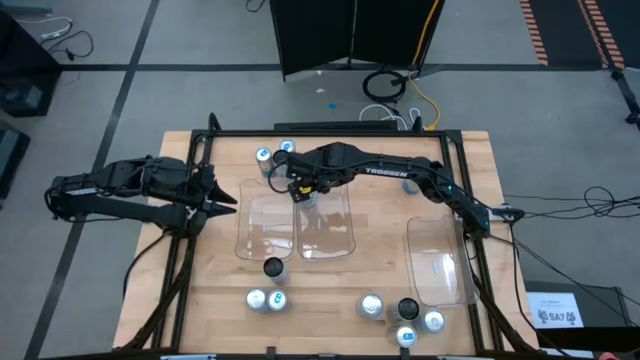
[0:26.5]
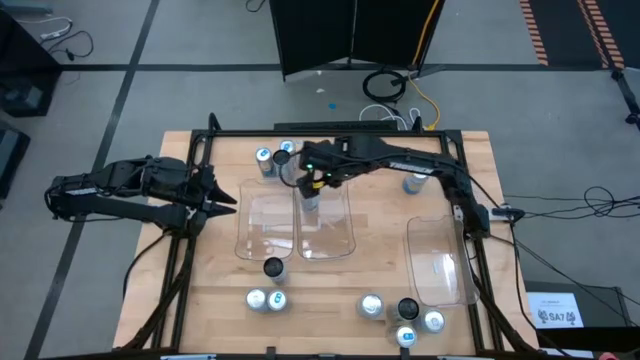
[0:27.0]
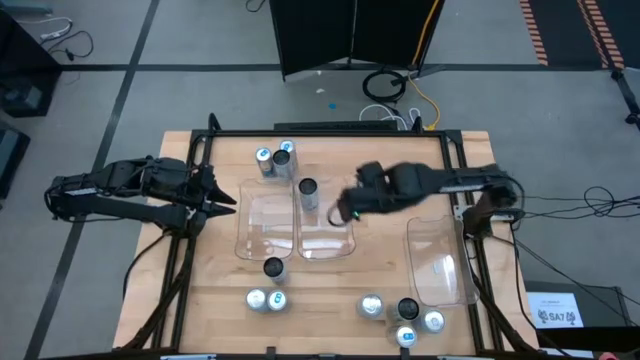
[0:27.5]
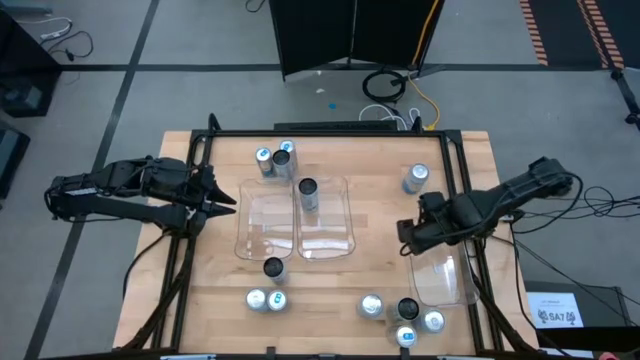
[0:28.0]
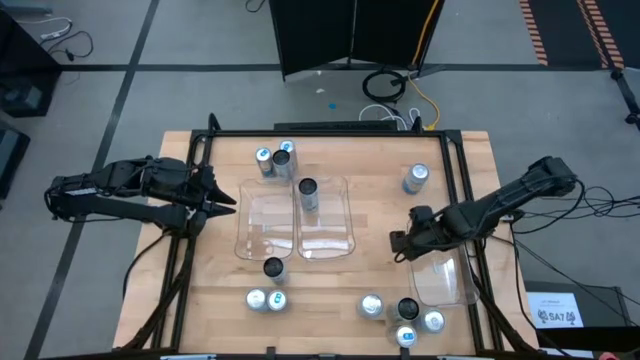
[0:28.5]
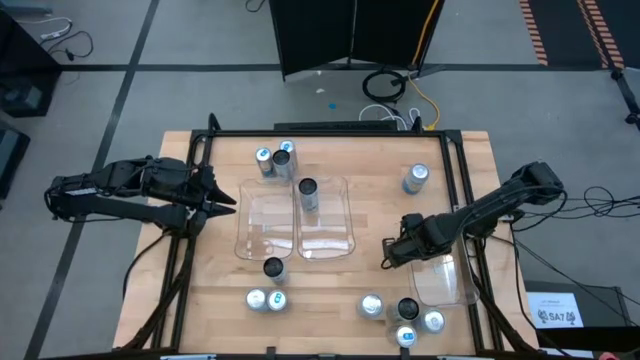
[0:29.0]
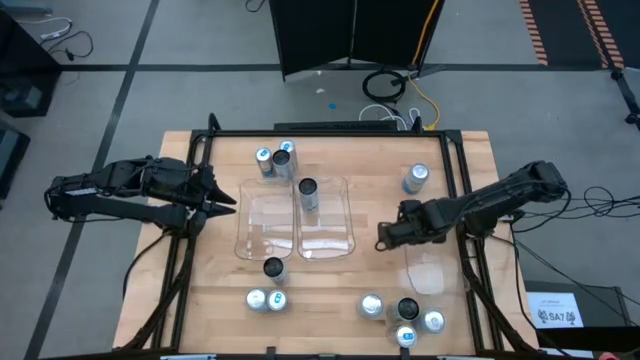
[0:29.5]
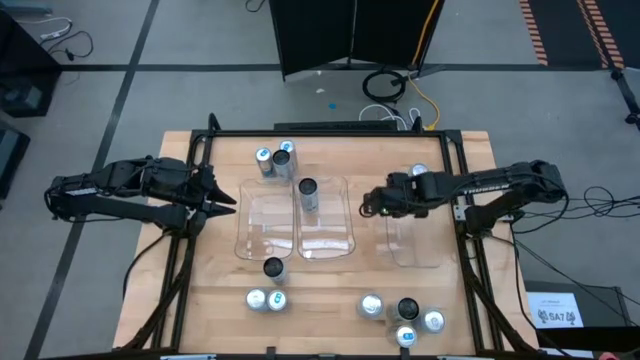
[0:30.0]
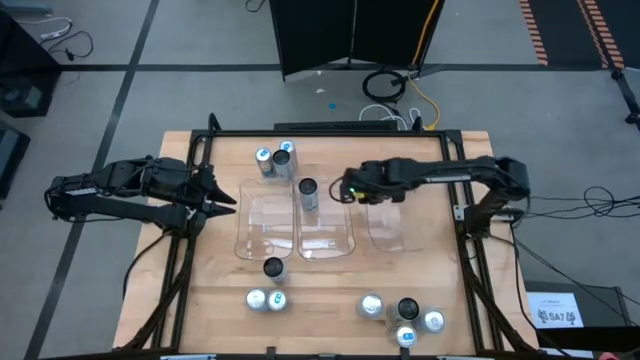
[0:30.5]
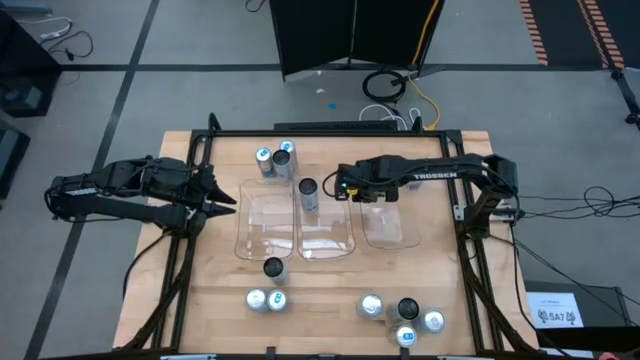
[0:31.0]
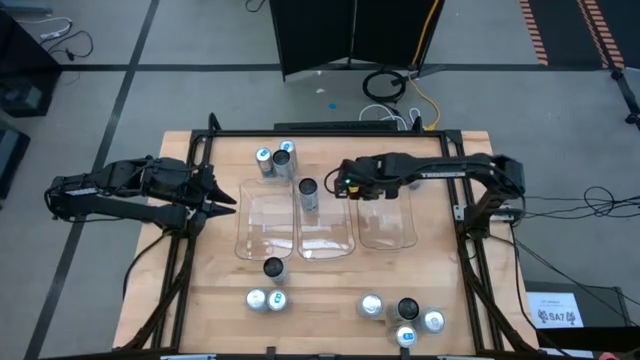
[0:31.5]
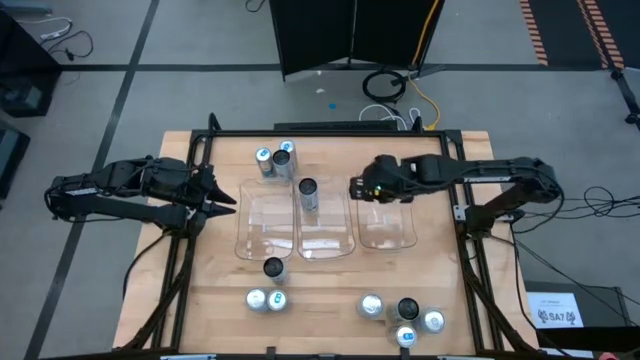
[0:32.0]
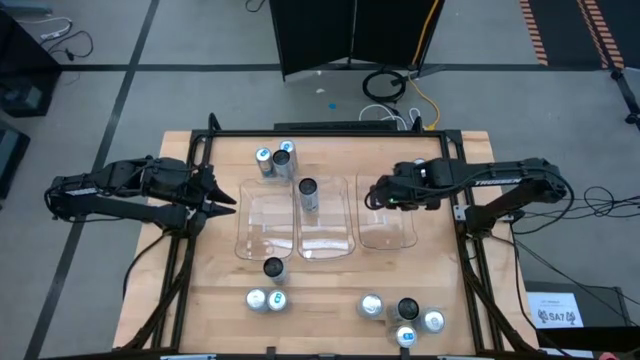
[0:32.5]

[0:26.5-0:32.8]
Task: Sort soda cans
Move the bottom transparent bin to the middle right of the table

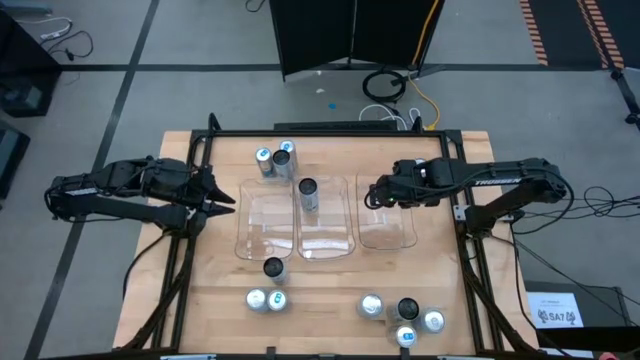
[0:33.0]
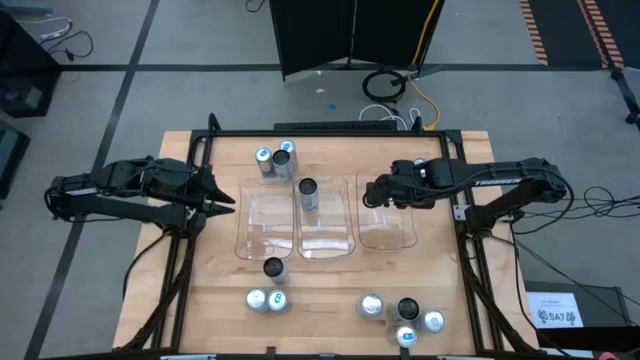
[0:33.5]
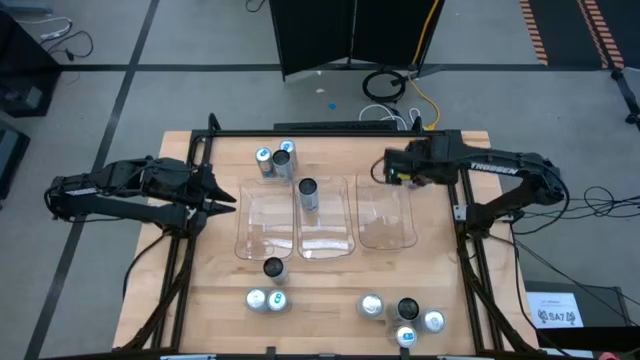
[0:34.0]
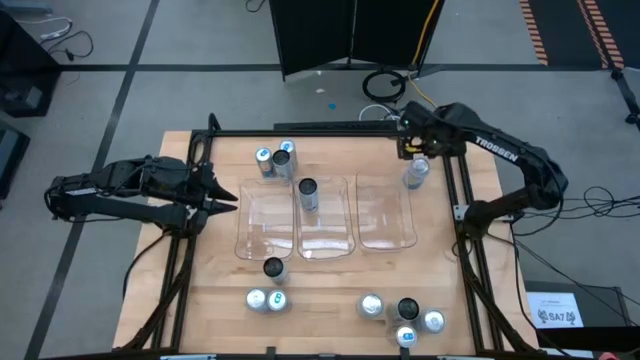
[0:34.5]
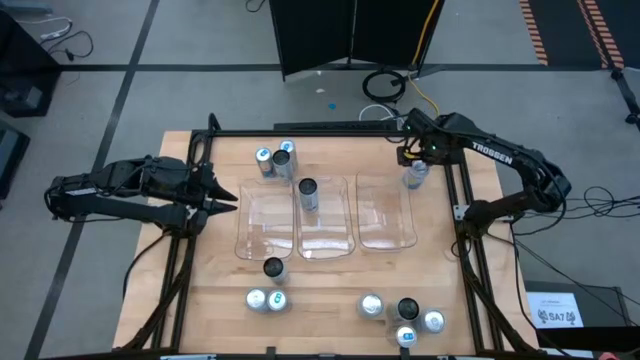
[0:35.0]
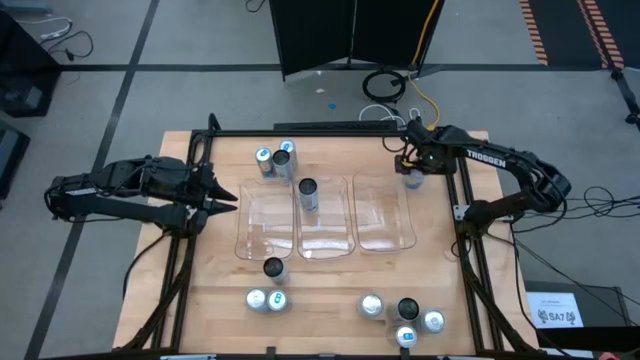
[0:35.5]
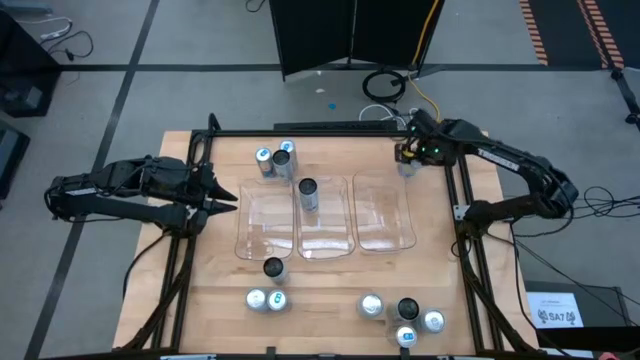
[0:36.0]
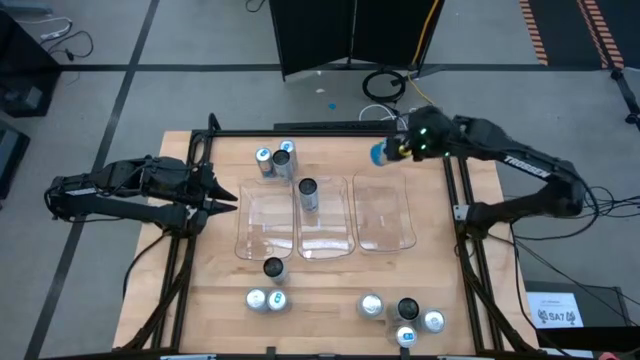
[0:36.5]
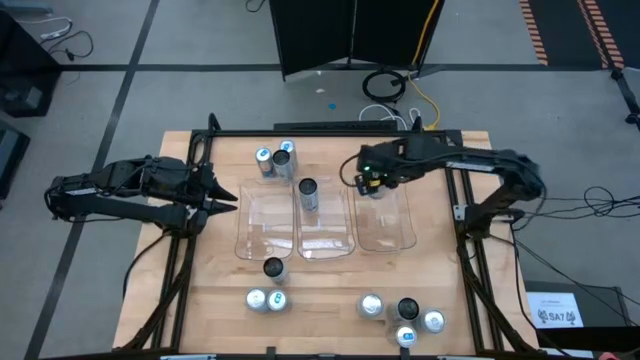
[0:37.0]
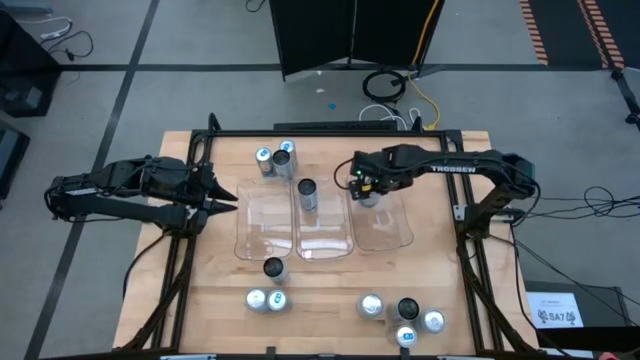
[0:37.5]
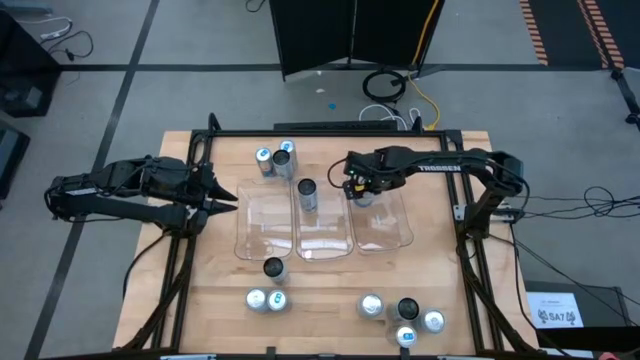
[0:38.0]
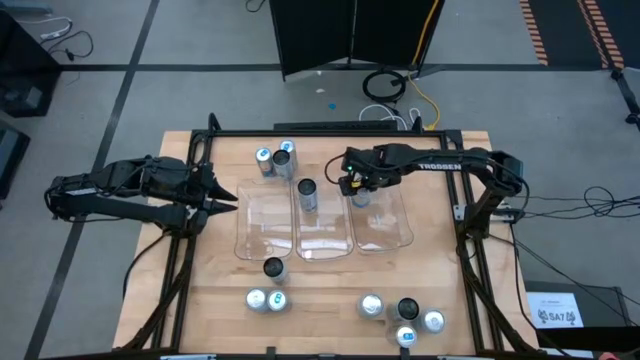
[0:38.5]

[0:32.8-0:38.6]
Put the top blue-white soda can into the right transparent bin

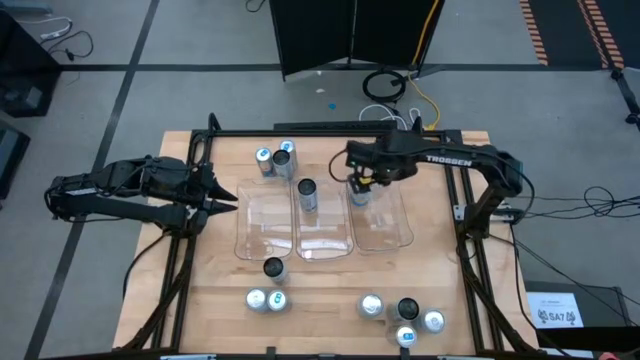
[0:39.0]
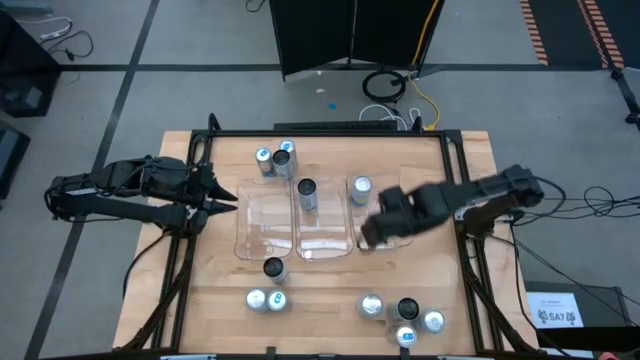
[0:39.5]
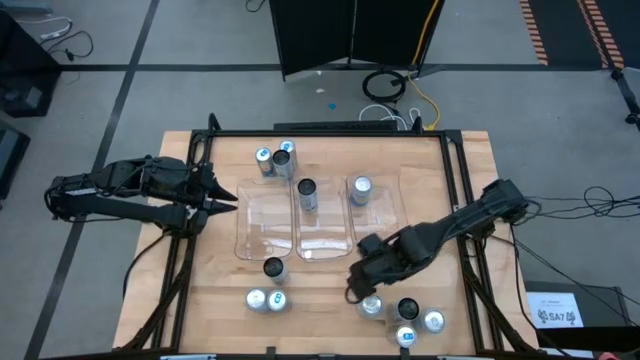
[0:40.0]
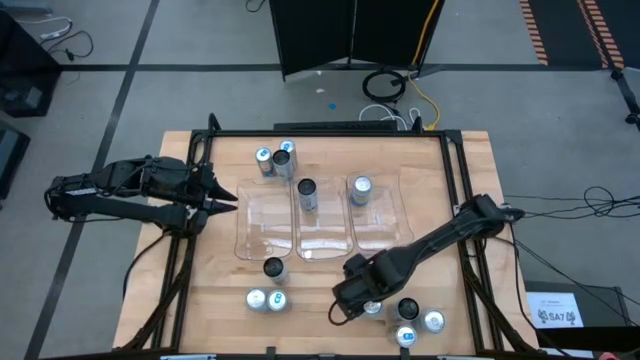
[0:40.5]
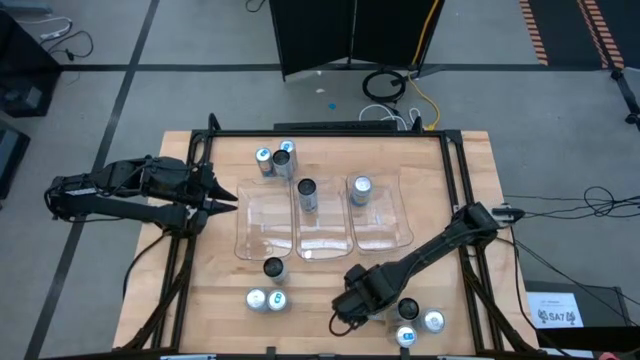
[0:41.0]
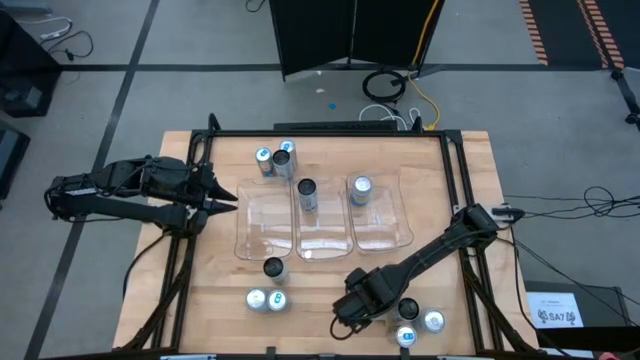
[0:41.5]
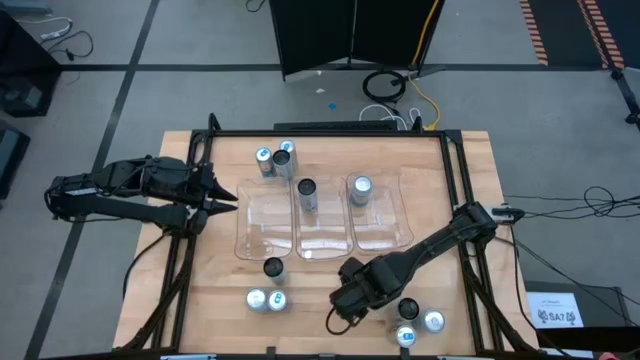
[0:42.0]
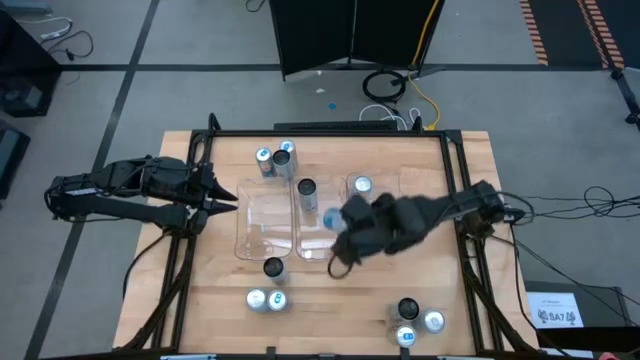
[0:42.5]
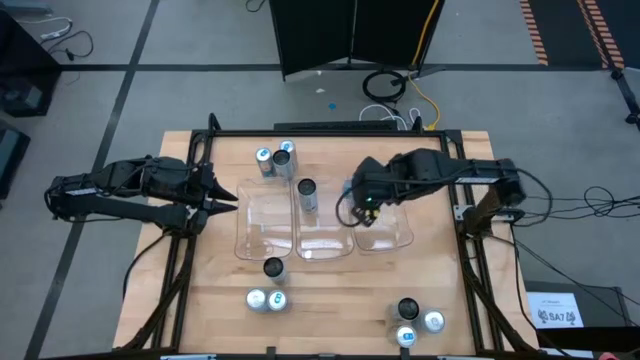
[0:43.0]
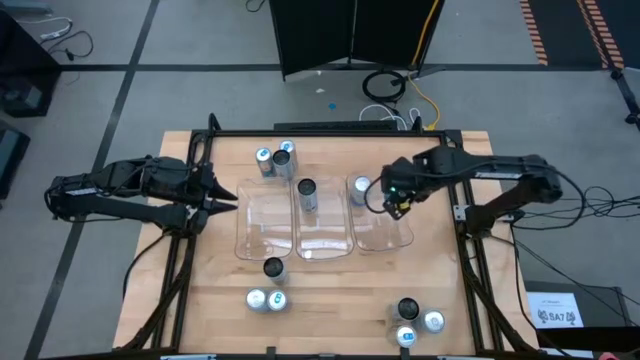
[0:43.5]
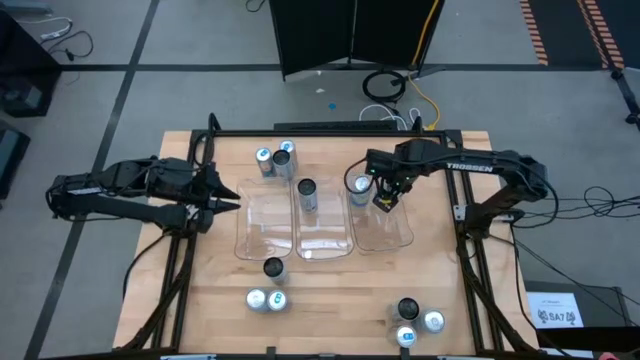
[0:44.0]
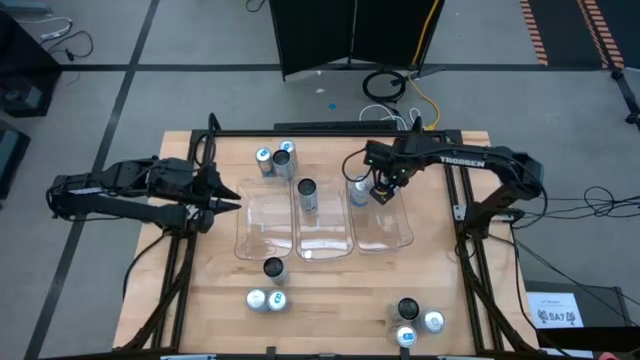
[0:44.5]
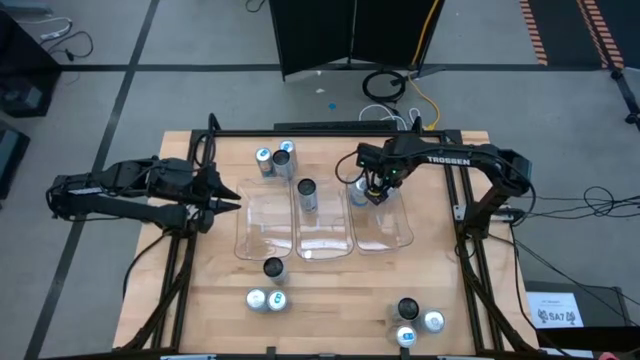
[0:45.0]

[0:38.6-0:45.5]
Put the bottom center blue-white soda can into the right transparent bin

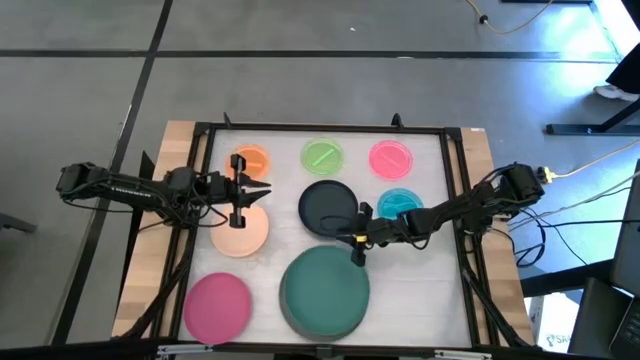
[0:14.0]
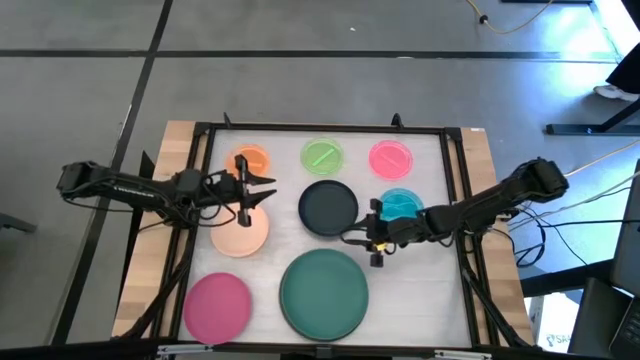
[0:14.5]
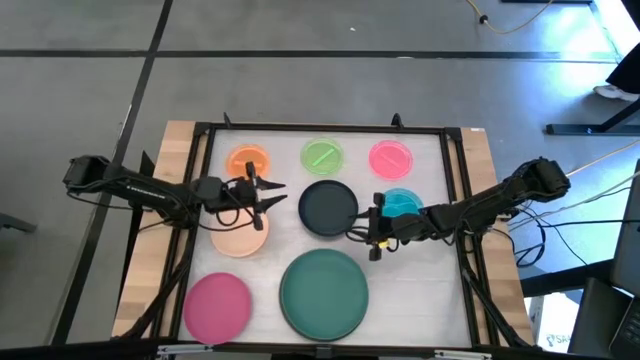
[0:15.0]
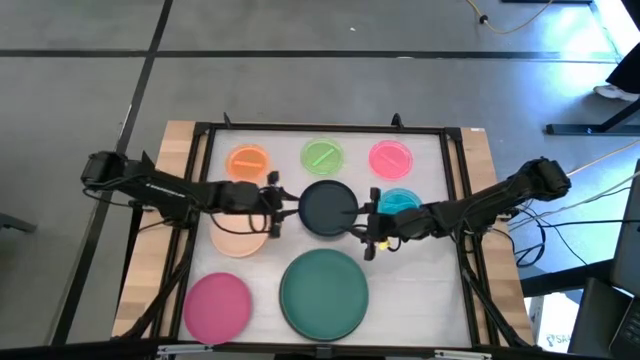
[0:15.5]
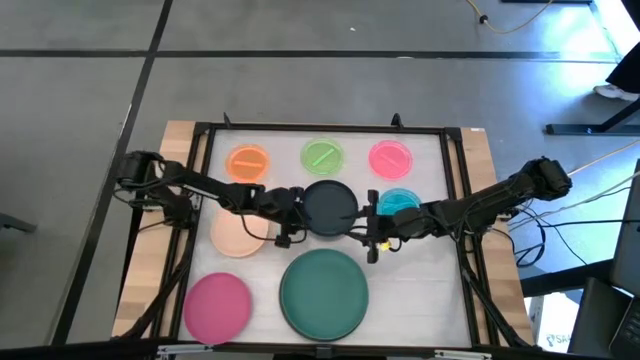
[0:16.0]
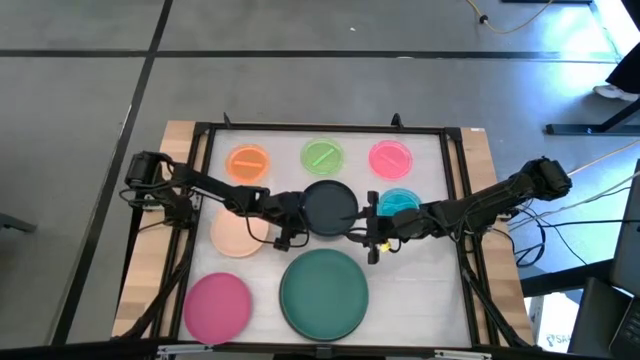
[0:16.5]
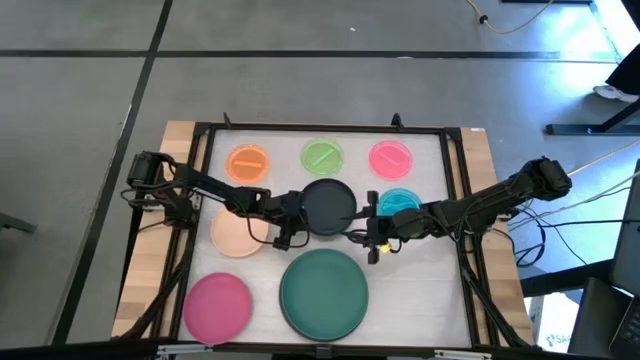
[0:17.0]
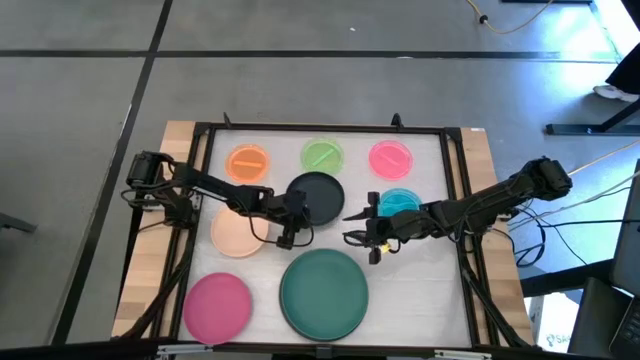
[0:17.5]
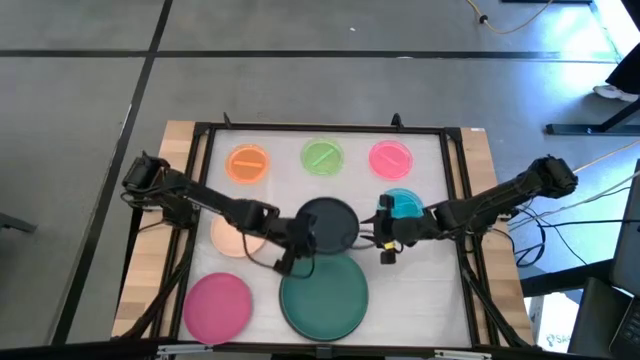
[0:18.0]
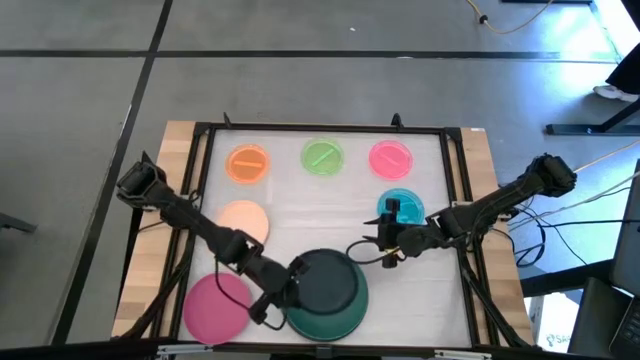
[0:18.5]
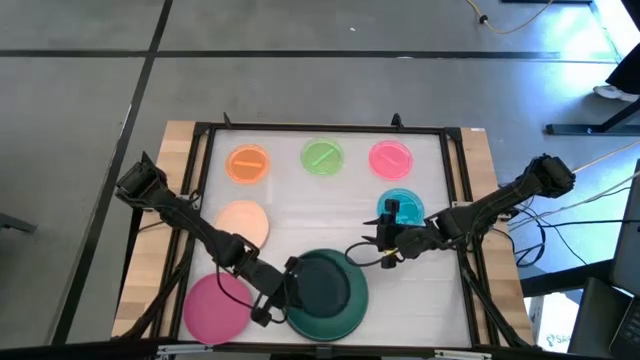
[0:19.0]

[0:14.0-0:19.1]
Task: Stack plastic plates
Stack the black plate on top of the green plate
